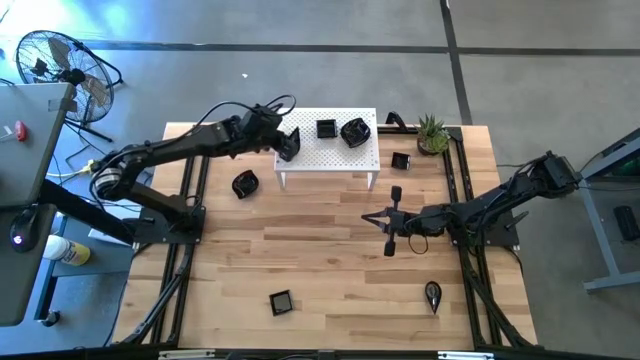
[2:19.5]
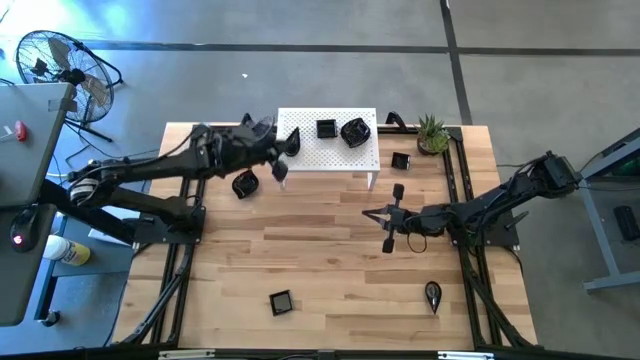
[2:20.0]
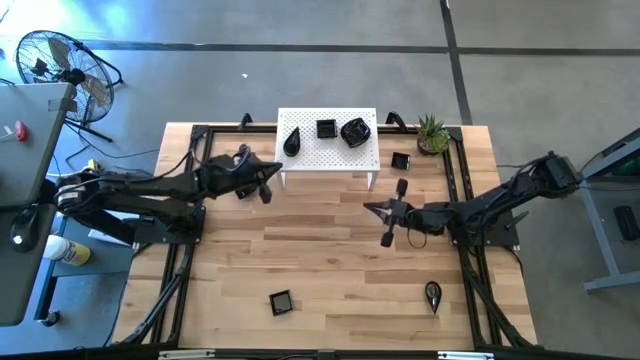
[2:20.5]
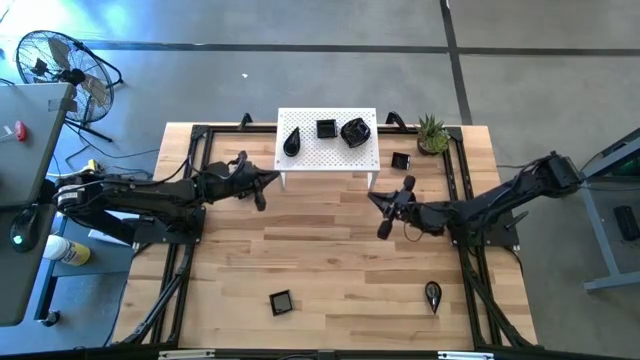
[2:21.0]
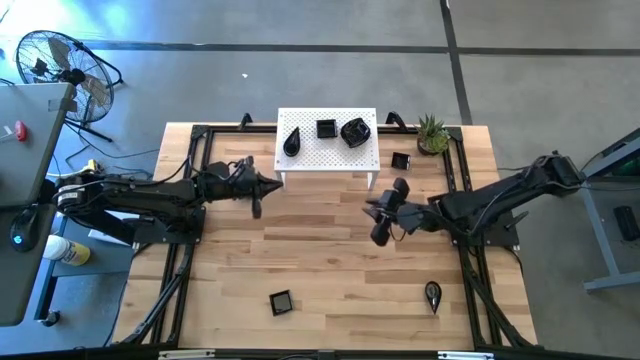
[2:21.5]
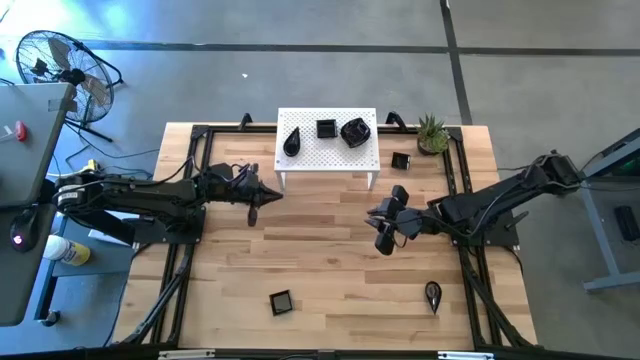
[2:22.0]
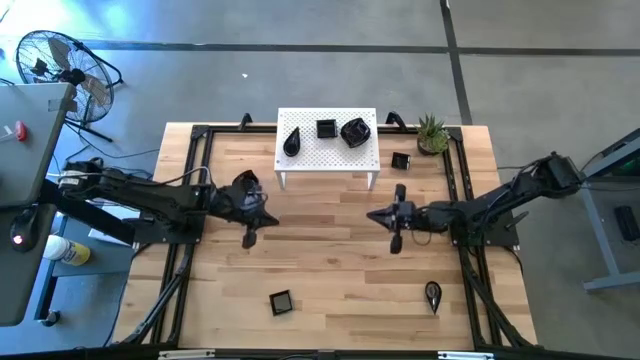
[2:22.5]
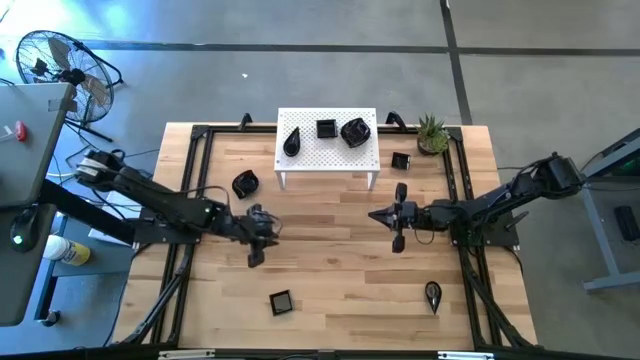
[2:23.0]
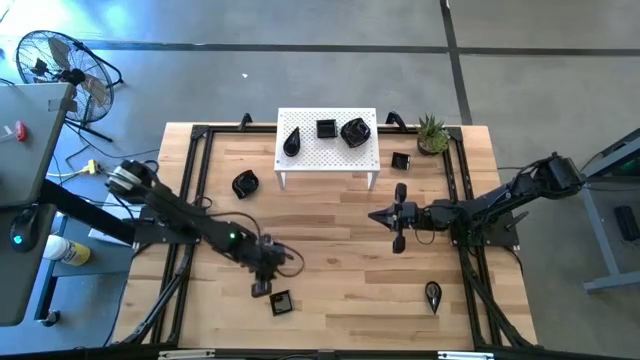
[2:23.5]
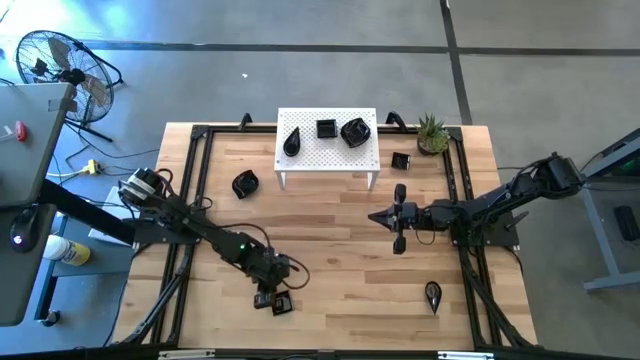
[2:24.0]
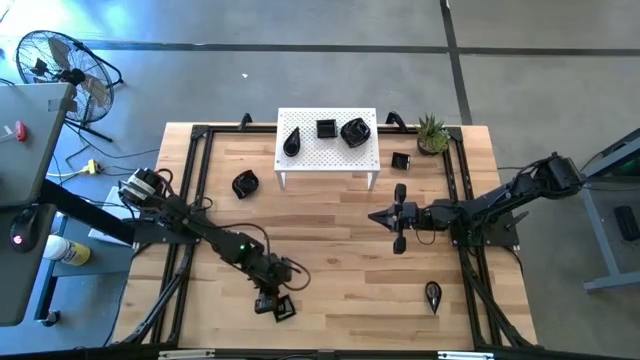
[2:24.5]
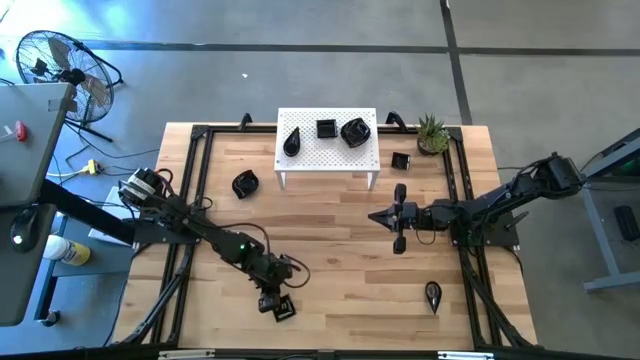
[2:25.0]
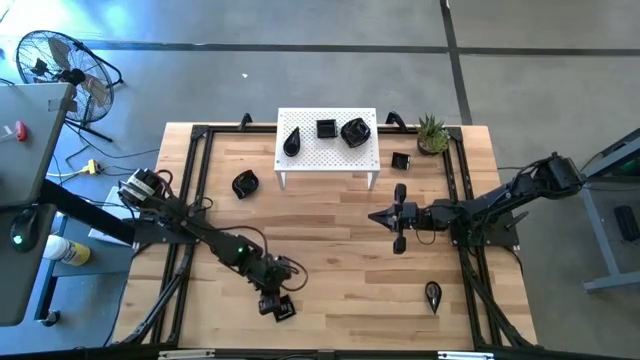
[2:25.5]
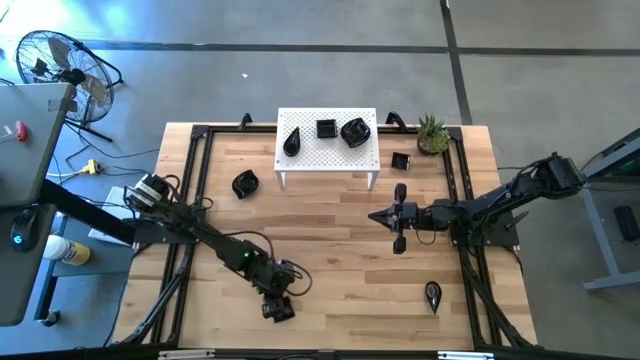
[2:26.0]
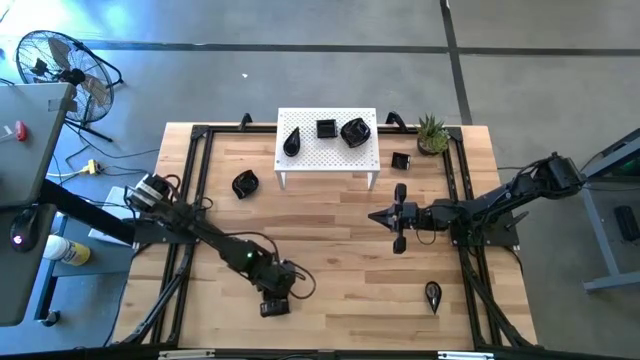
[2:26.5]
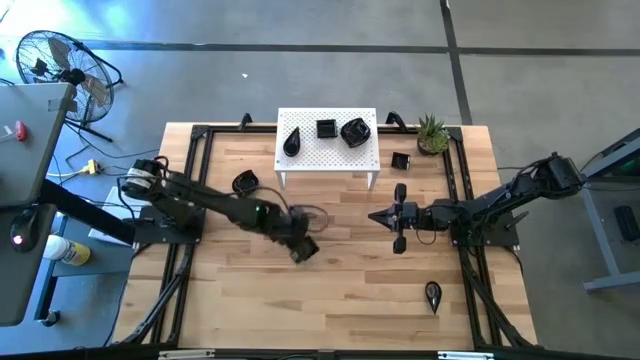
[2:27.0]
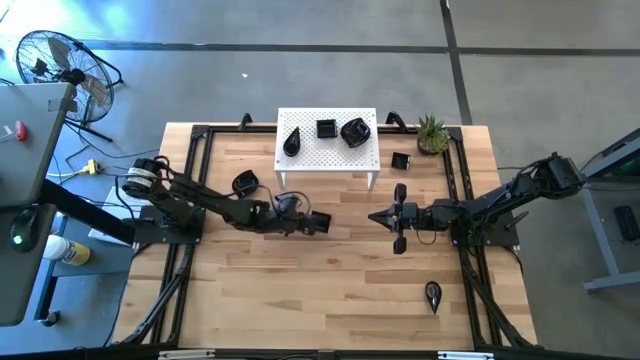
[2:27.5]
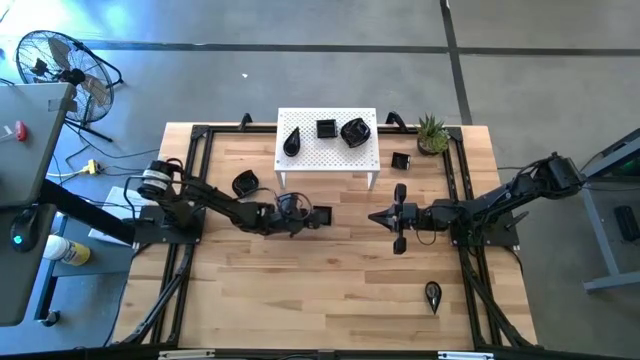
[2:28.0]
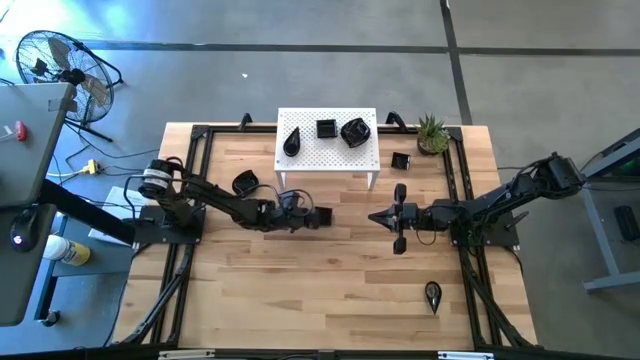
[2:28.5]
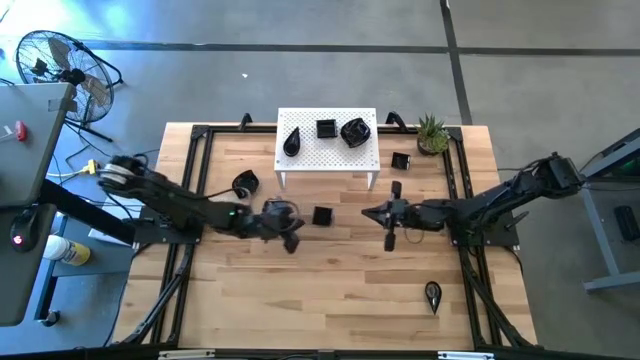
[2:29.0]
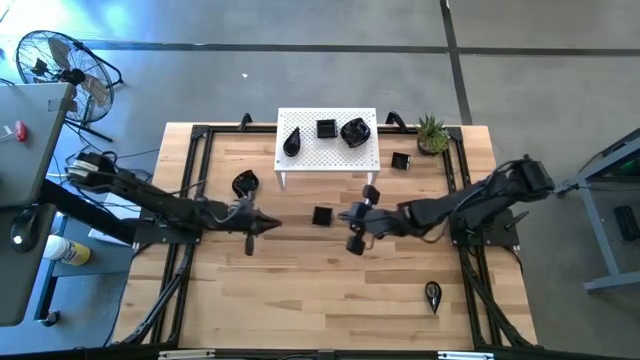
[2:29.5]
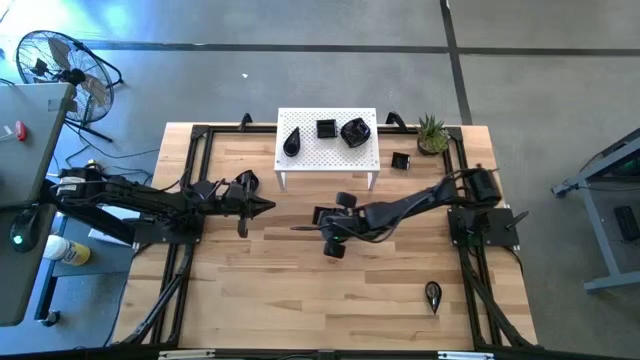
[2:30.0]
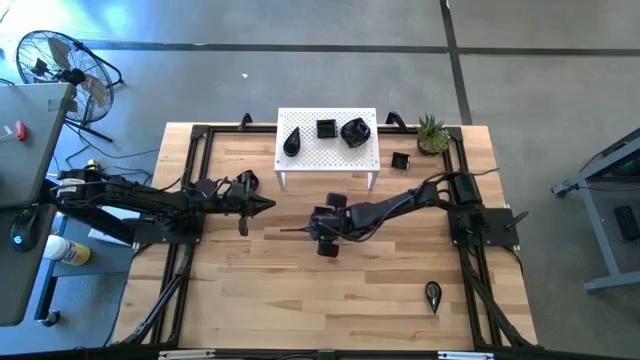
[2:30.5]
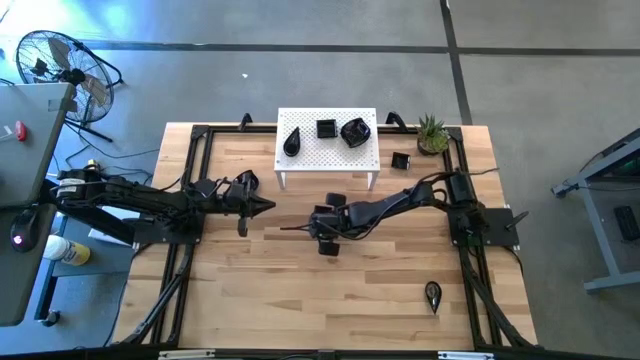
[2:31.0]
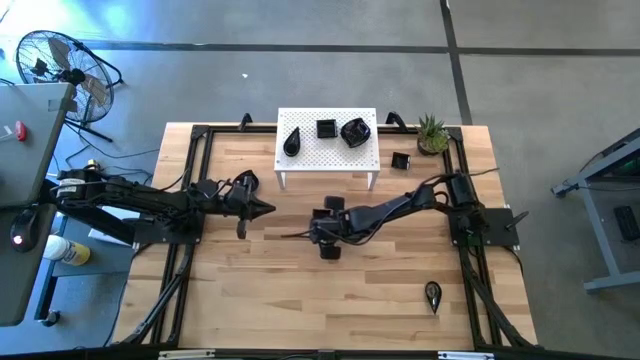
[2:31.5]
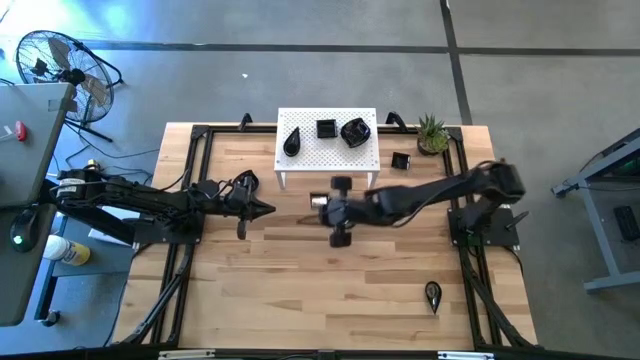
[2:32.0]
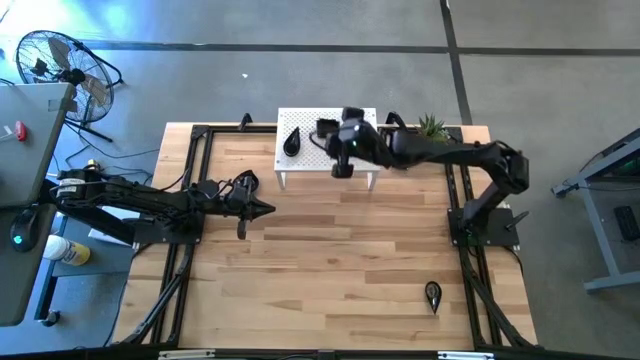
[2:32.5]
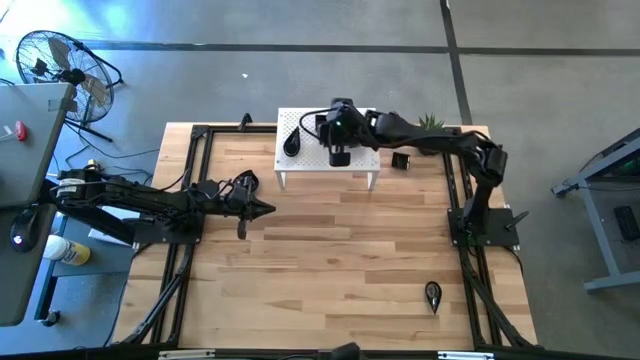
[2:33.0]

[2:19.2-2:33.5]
Task: Pick & Place Mini shaped plates
Stack the square bowl on top of the square bowls on the shelf

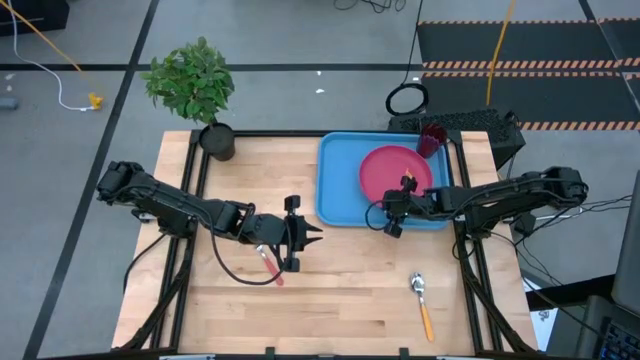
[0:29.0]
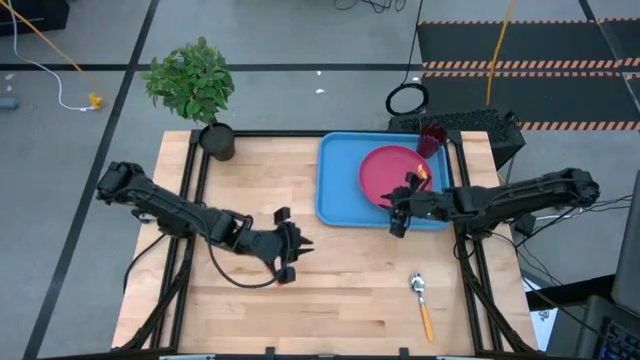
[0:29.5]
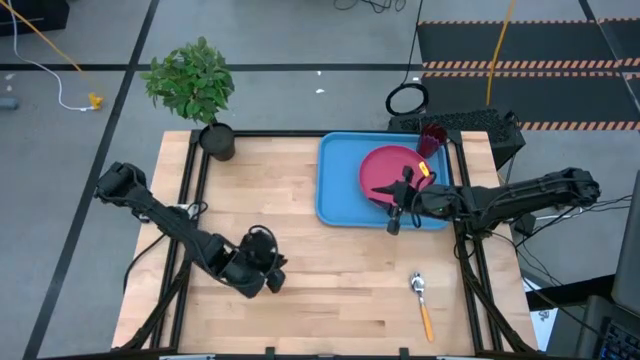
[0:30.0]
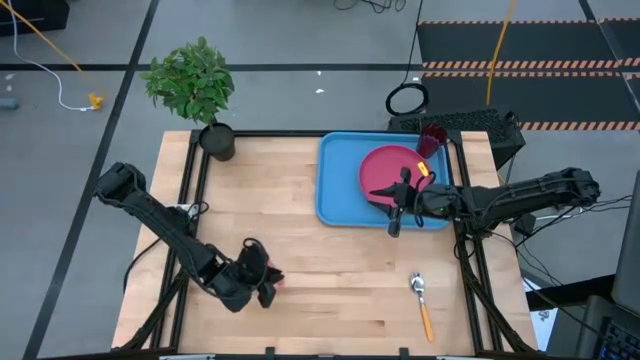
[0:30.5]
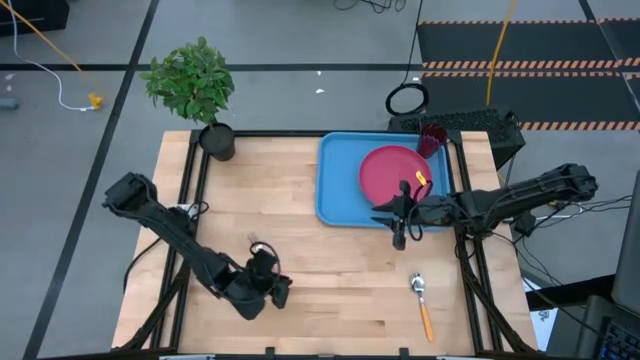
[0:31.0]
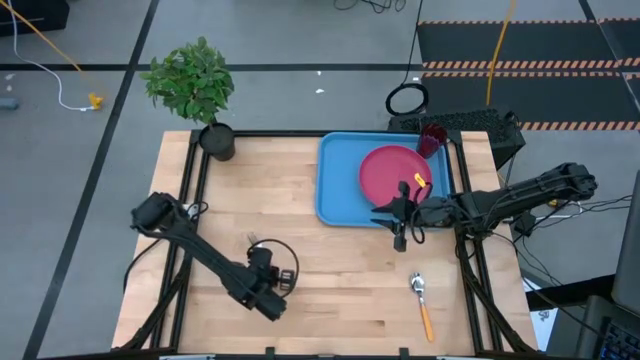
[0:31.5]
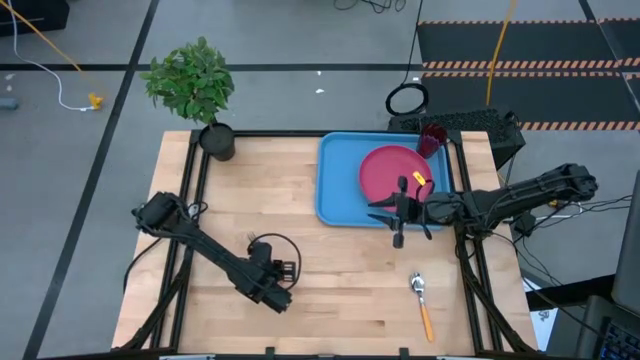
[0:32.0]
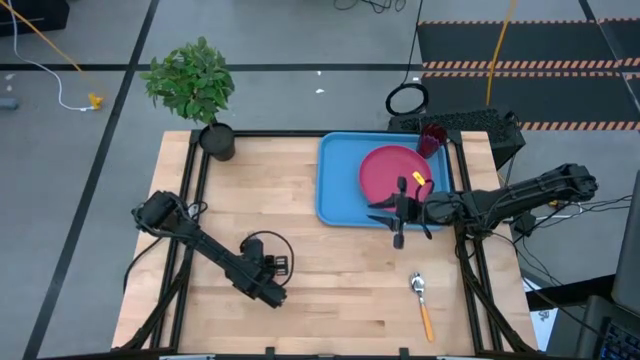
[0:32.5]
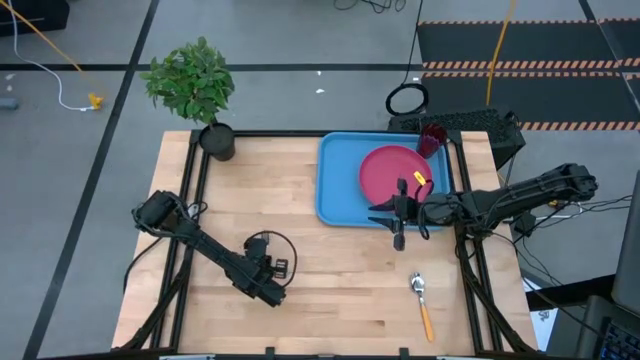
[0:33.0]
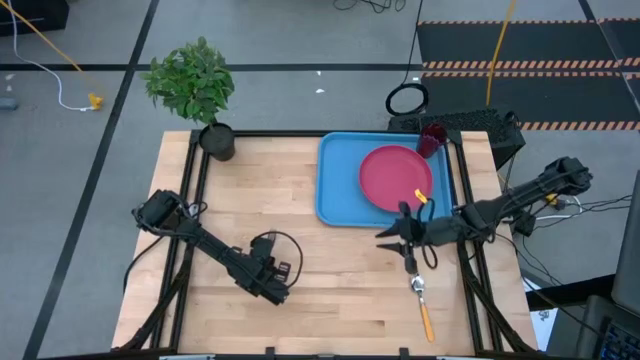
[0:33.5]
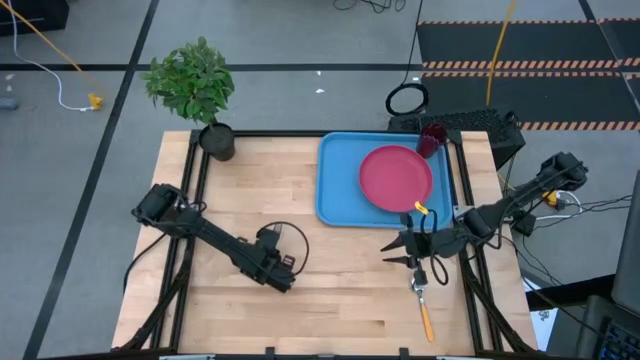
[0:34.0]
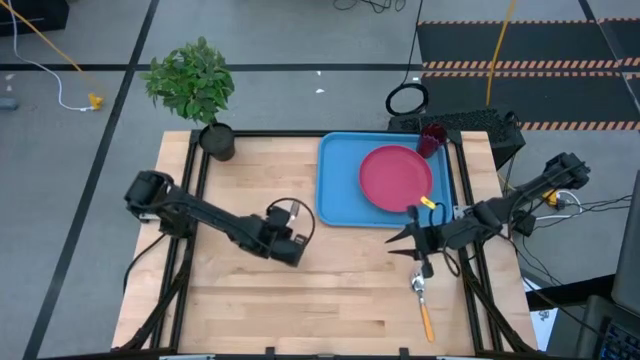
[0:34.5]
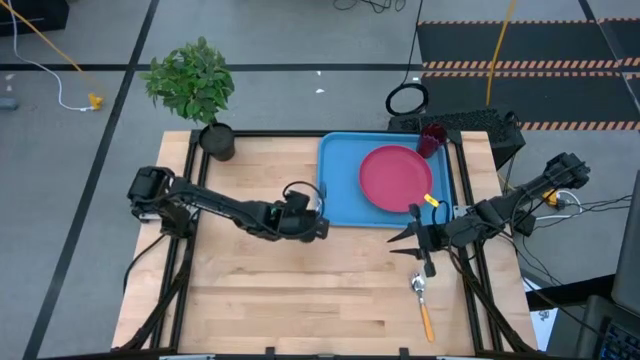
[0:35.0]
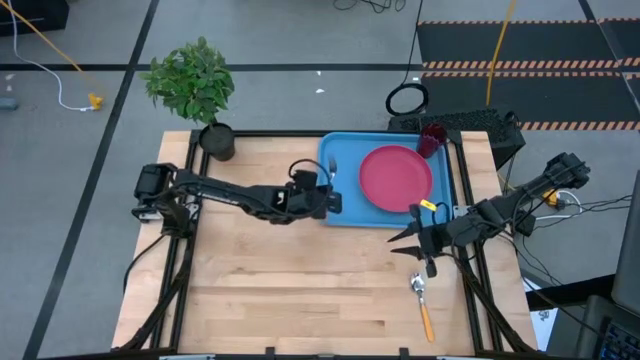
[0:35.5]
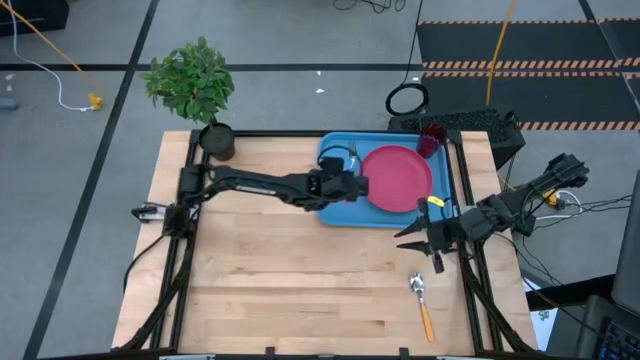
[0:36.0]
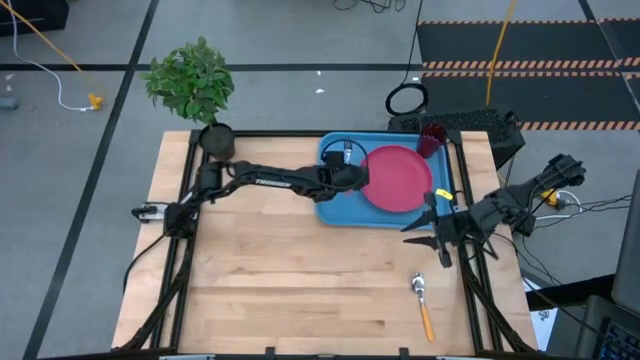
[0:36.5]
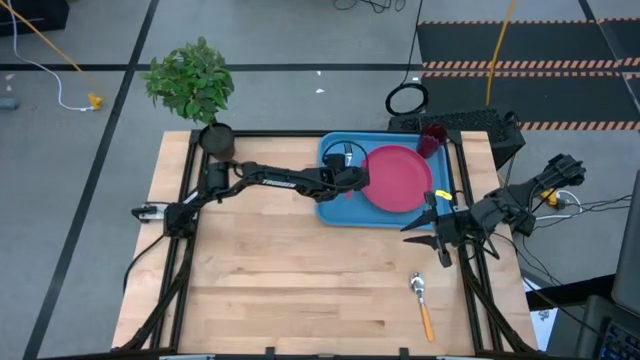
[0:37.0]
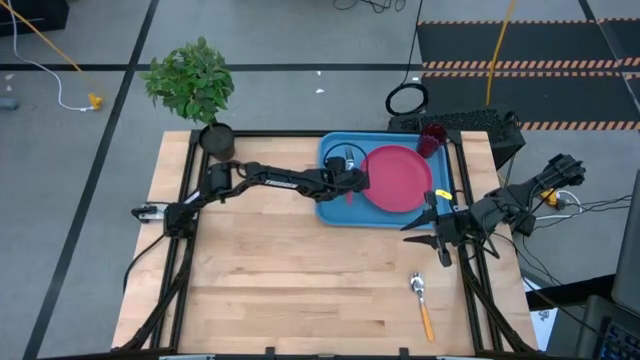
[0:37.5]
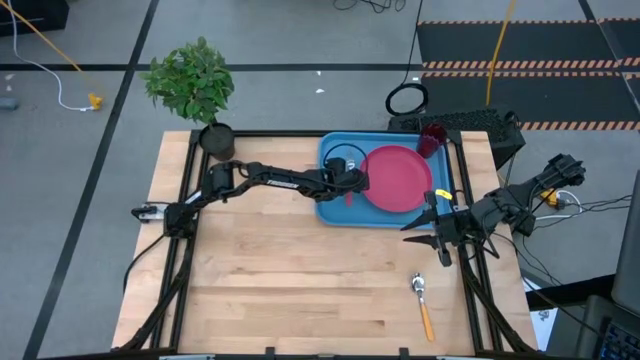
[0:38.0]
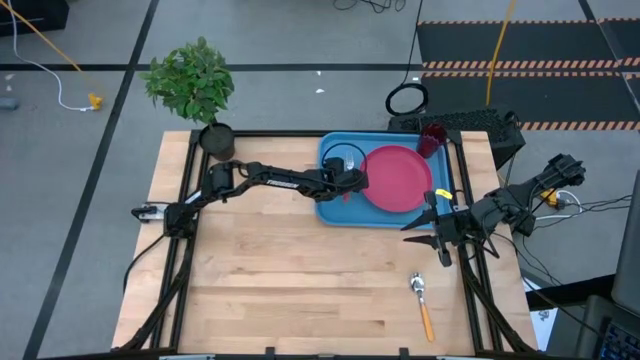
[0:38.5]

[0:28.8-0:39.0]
Task: Pick and place plate/cup/fork/spoon on tray
Put the pink fork on the blue tray to the left of the pink plate
